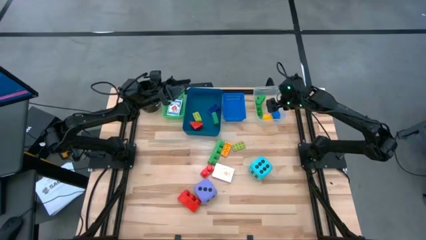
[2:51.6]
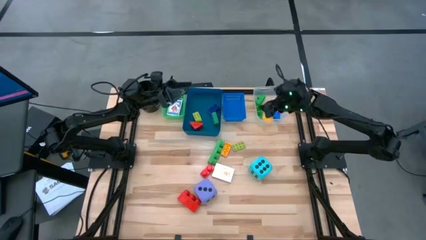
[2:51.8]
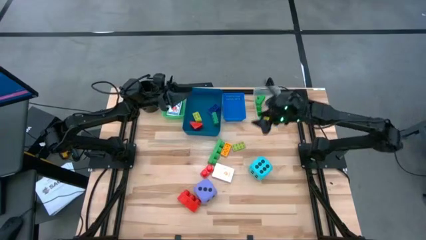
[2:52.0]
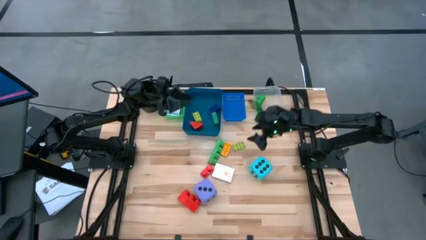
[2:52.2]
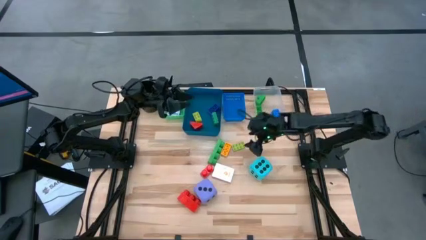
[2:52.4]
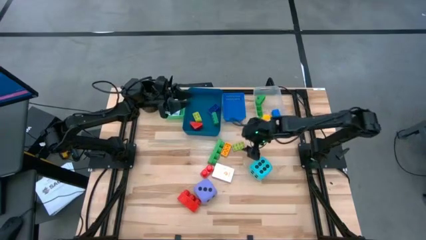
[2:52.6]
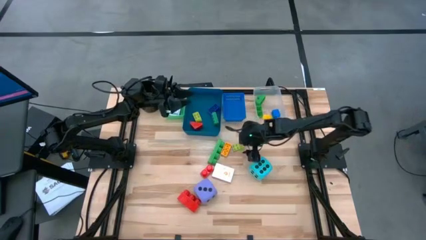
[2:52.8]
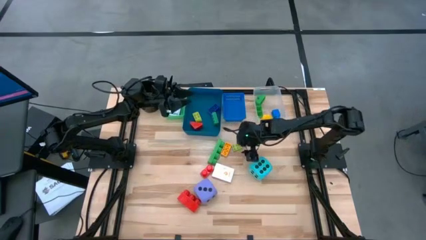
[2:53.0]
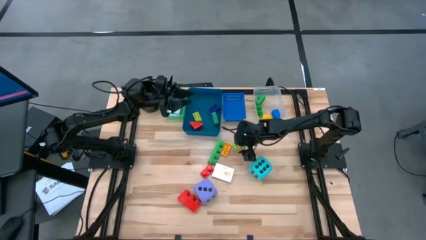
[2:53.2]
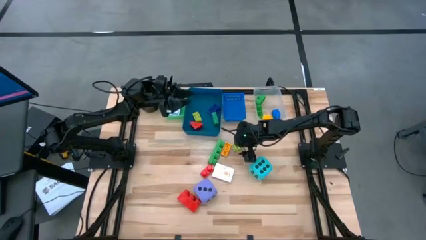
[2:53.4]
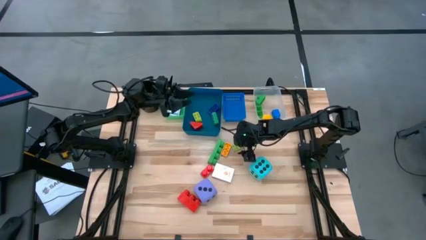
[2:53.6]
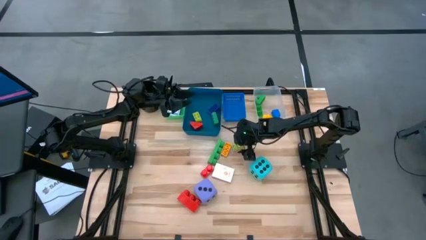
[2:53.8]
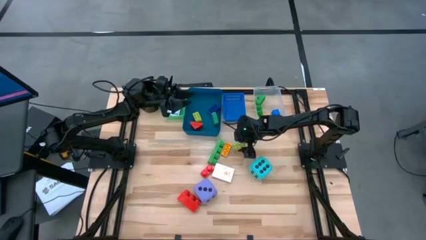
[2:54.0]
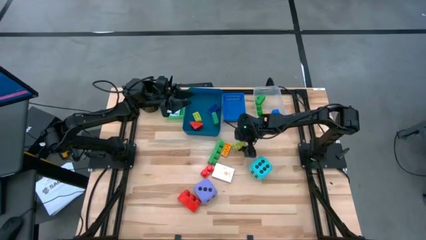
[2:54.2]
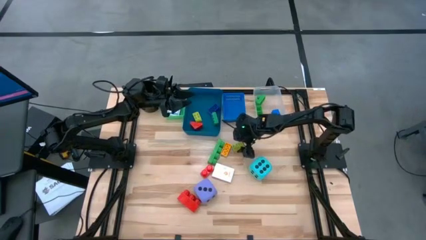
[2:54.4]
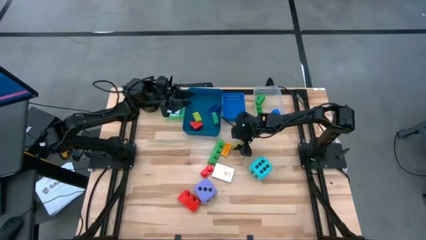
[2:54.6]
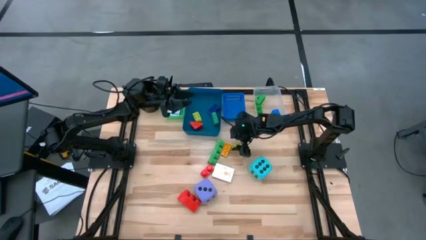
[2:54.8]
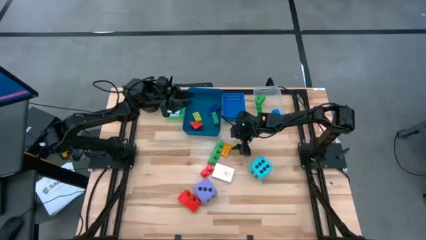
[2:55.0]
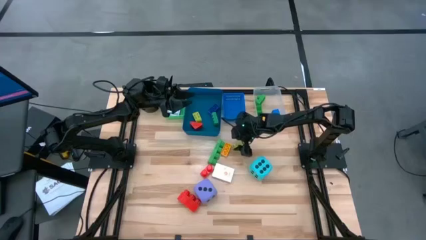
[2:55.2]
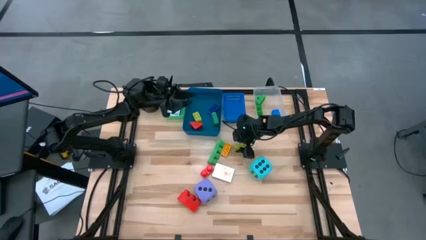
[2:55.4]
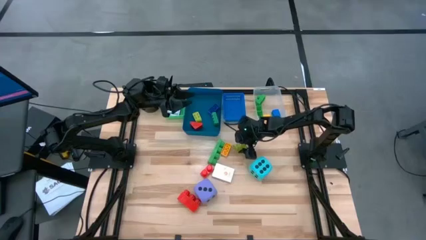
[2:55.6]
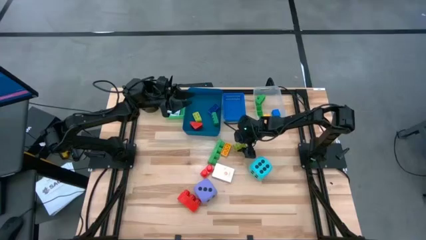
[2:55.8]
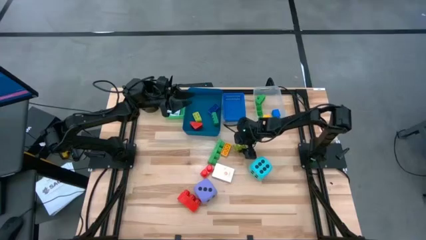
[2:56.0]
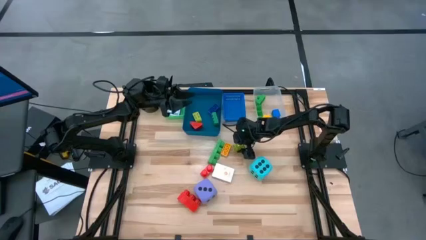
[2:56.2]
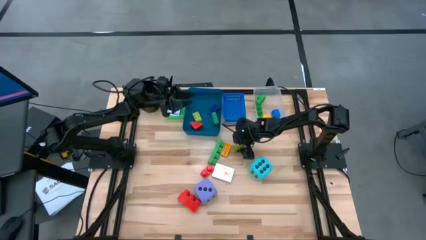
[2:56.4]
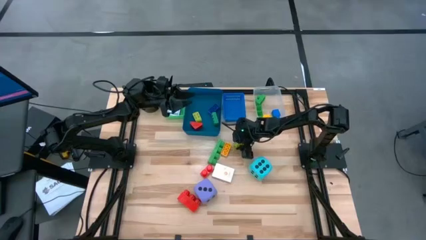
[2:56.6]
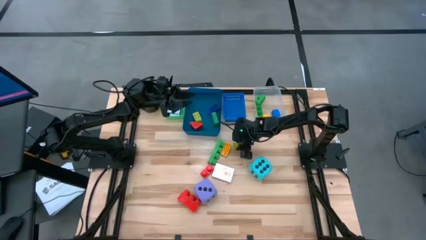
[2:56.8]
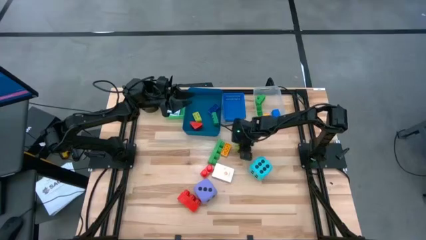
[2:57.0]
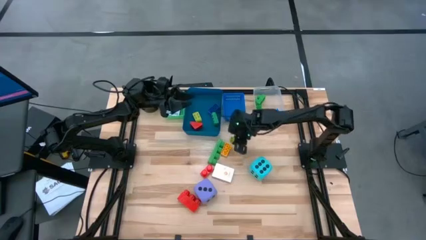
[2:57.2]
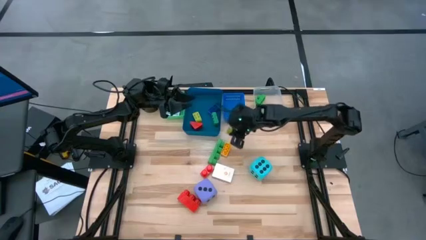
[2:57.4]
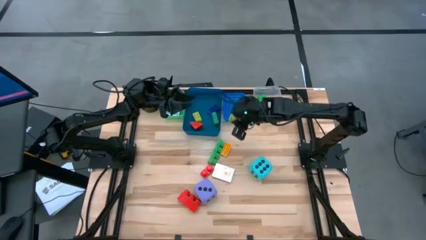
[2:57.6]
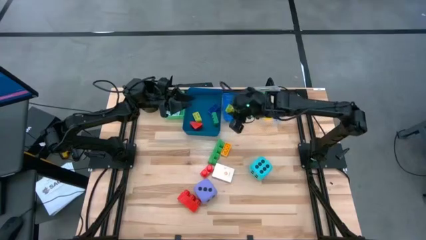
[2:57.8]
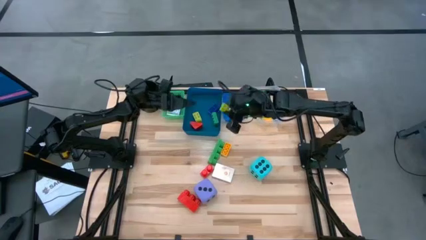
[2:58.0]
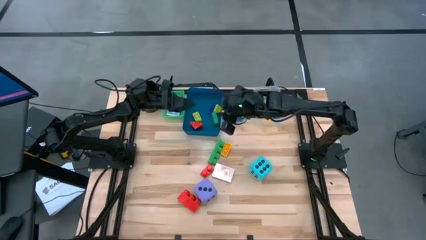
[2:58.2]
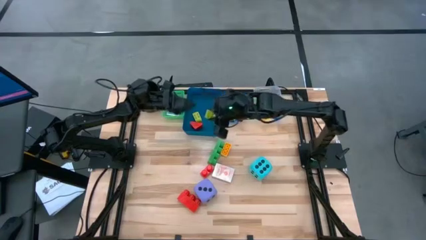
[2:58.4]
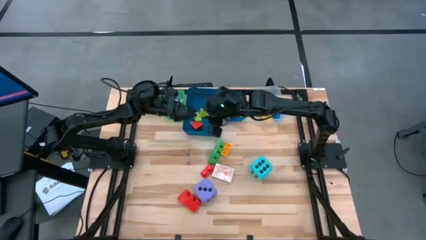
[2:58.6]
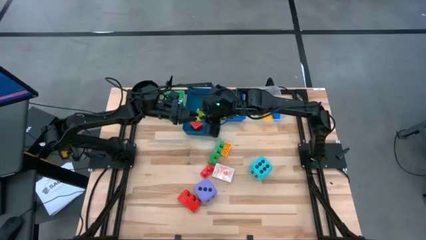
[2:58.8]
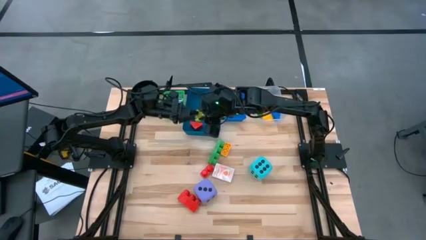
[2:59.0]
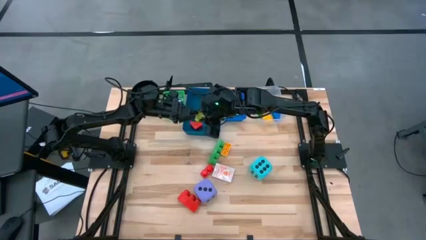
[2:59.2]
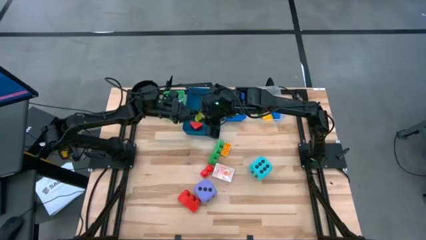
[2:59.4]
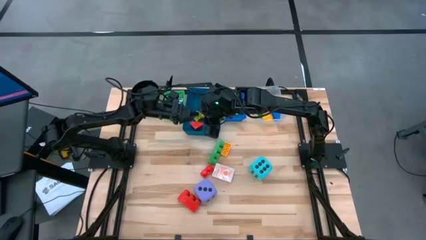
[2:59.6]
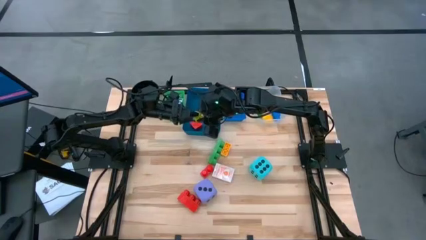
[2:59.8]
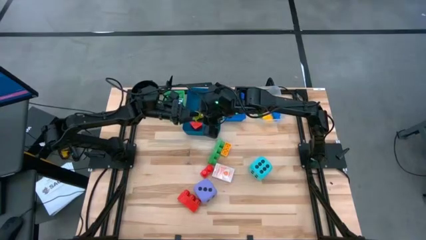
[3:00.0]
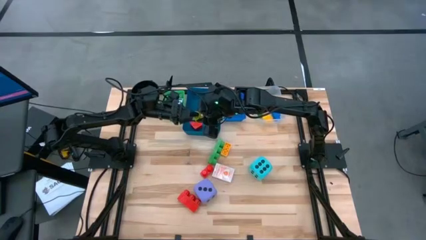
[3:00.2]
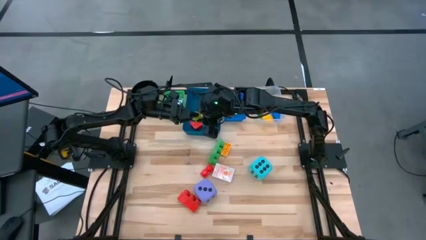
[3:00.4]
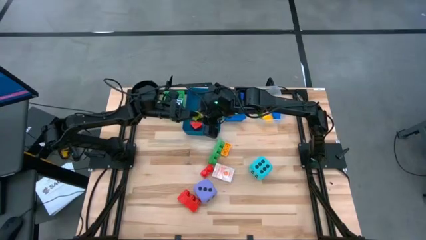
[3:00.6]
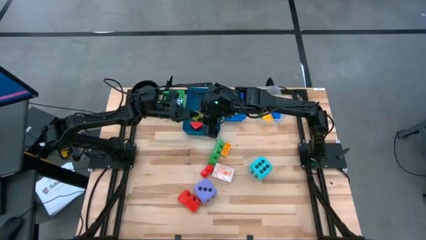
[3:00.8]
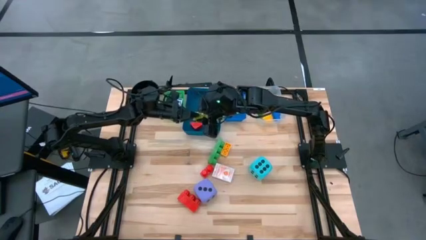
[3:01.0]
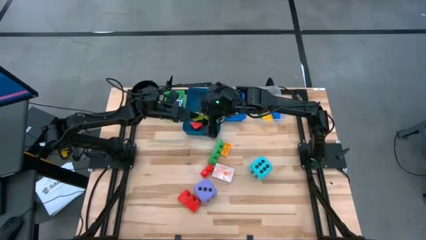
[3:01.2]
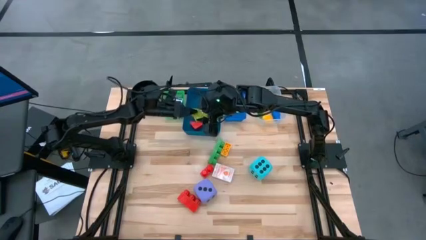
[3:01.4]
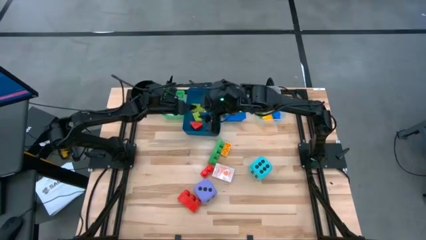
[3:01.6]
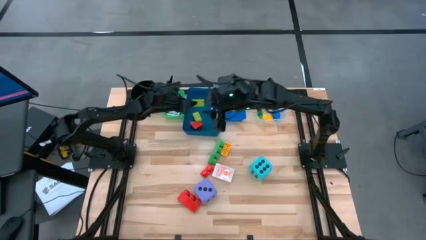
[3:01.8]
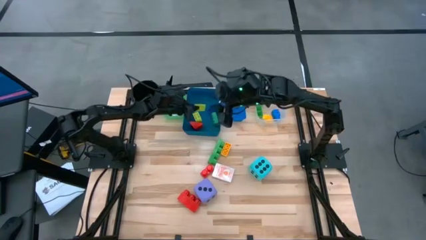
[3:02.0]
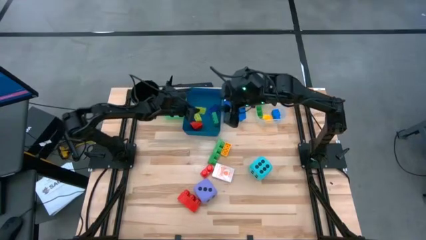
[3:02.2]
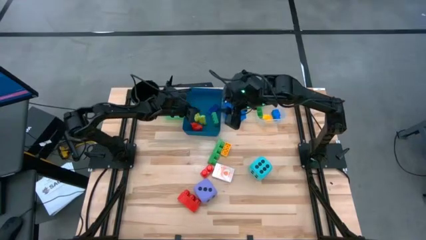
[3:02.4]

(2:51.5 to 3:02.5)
Task: Pick & Place Toys
Put the small light green game piece into the dark blue bin

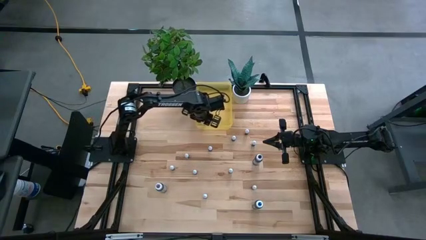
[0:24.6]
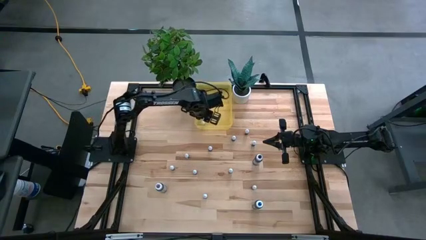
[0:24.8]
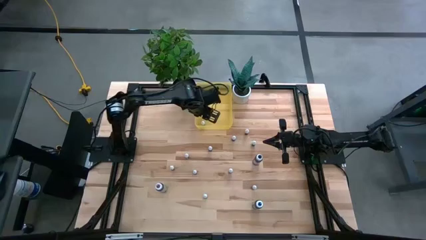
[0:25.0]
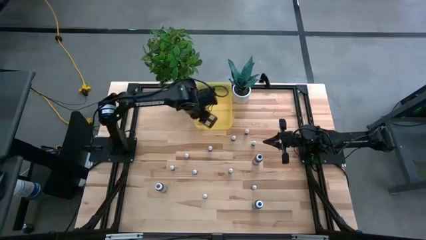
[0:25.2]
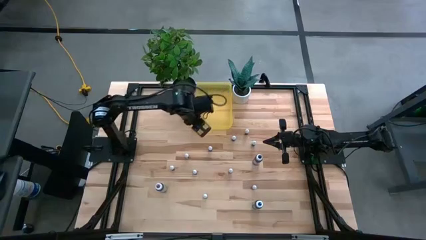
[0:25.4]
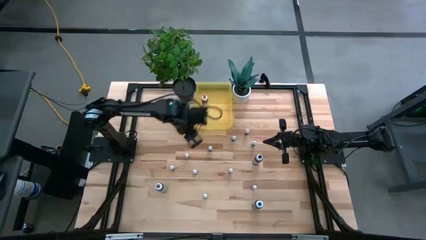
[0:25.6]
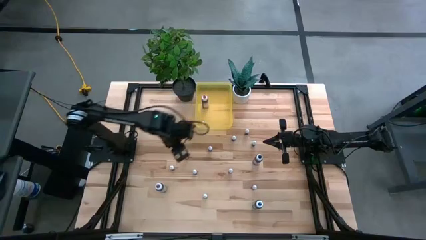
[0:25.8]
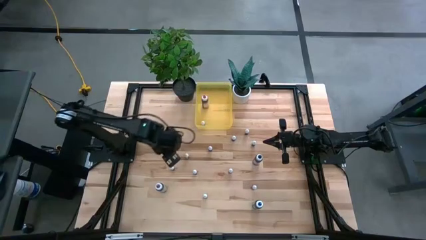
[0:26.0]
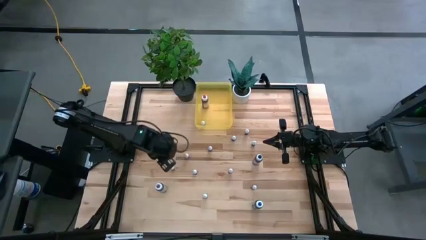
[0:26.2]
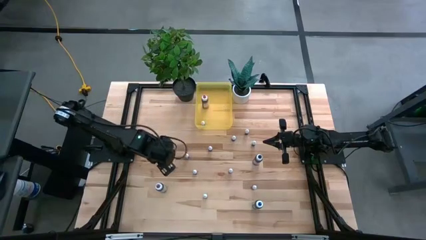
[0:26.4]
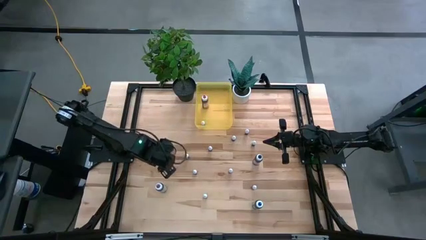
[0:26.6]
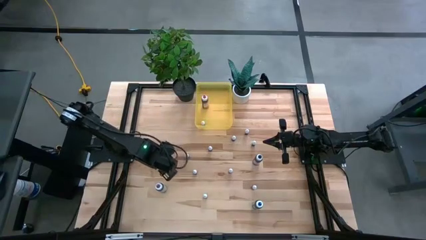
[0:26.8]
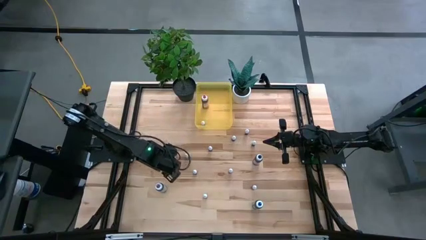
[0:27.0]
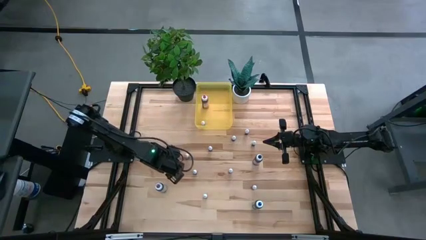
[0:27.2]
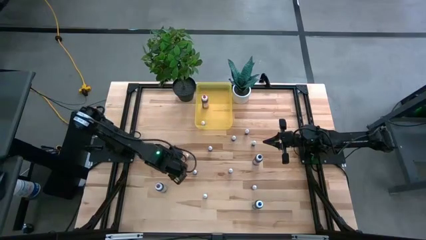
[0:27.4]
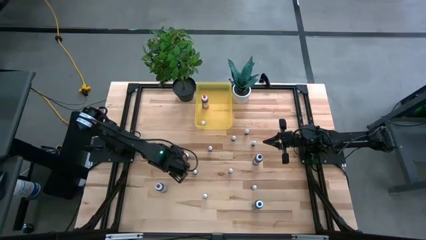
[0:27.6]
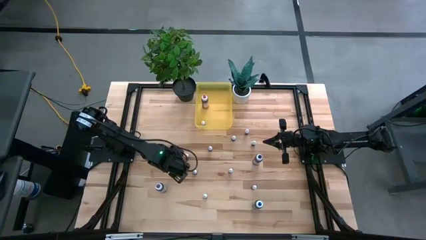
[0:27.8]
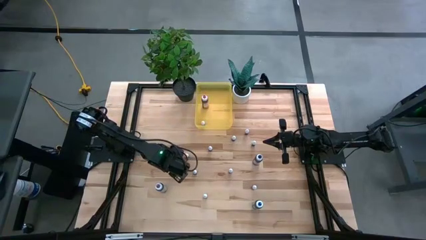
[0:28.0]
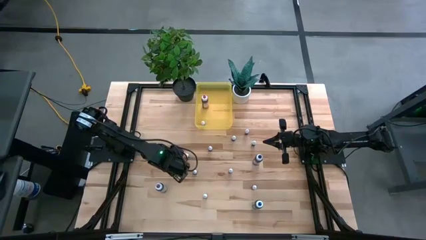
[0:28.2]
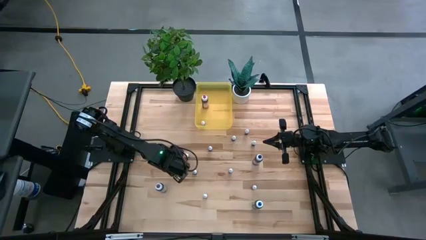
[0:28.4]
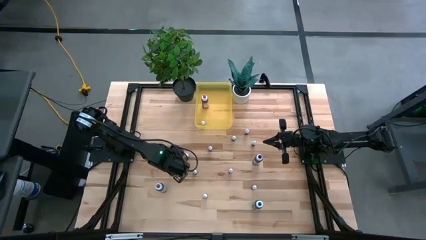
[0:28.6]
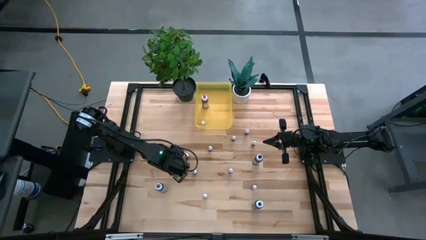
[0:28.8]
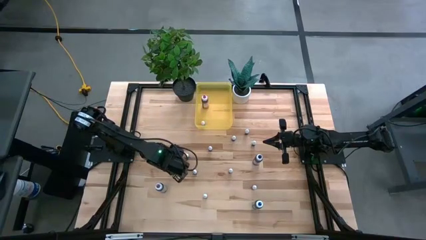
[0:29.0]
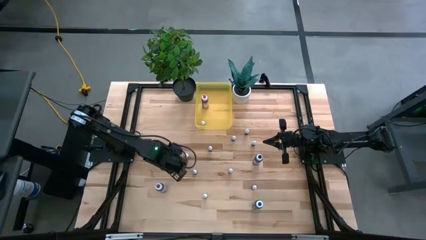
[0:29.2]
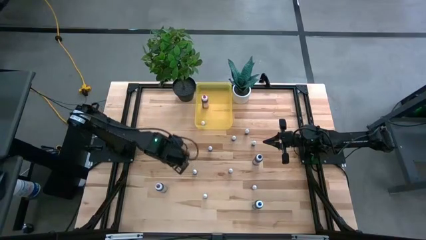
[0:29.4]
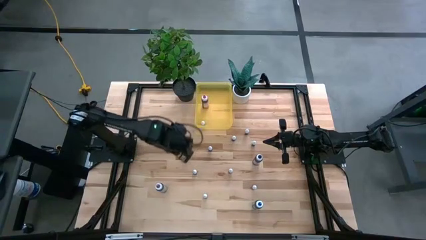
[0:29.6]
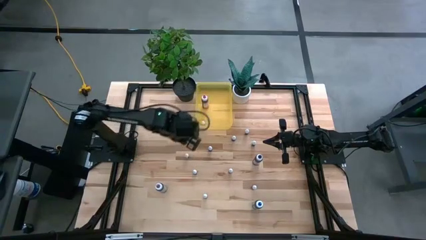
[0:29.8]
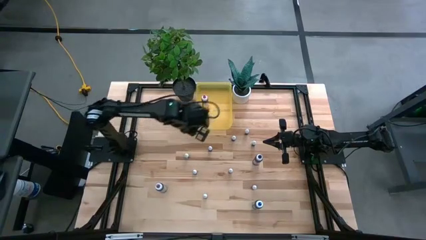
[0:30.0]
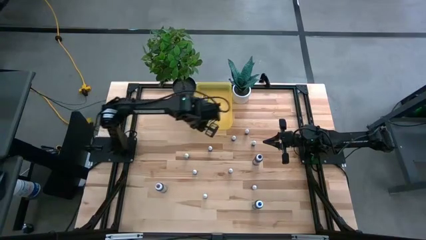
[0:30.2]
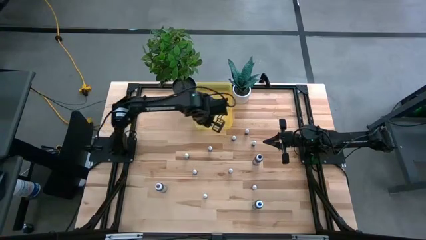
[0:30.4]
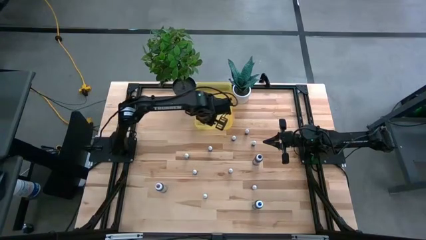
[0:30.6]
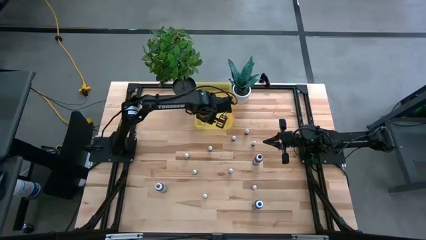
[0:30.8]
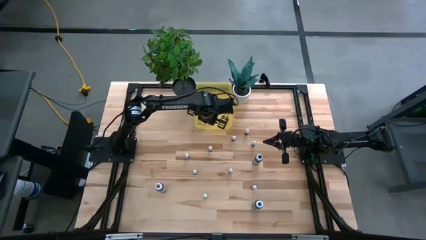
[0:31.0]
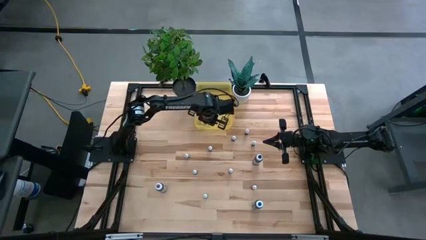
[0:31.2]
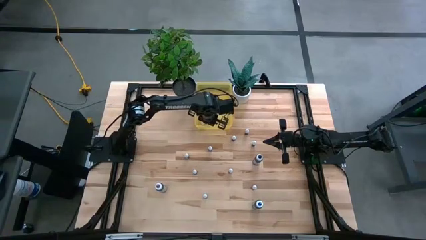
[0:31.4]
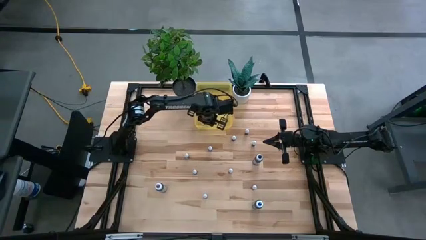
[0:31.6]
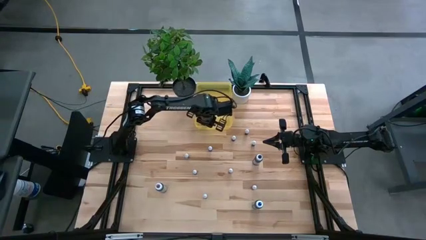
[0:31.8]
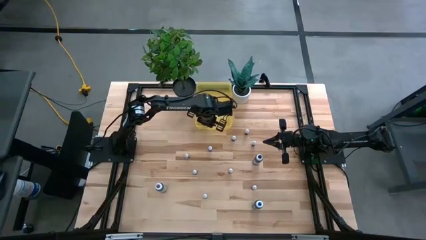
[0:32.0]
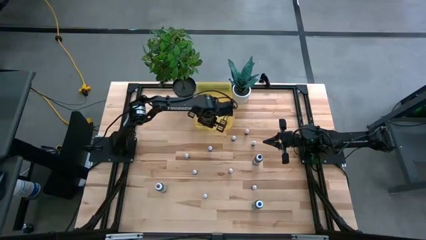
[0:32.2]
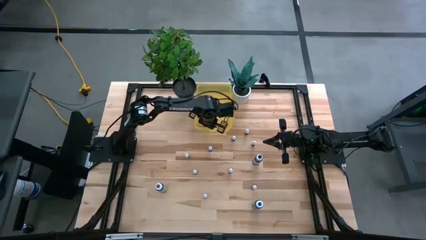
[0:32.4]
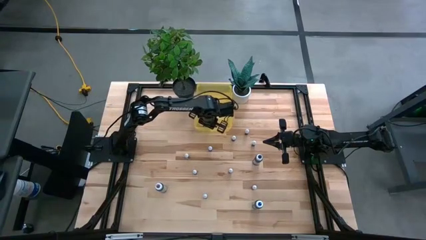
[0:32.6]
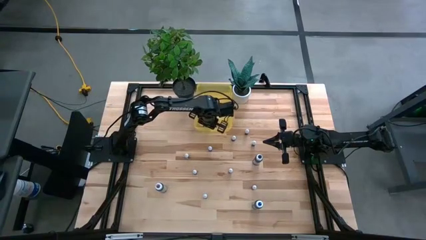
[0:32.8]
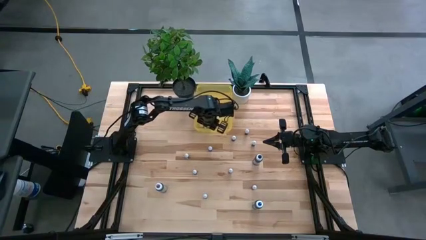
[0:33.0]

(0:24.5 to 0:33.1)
Task: Pick & Place food coloring
Put the small green food coloring bottle into the yellow bin
